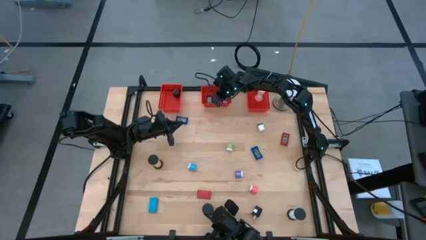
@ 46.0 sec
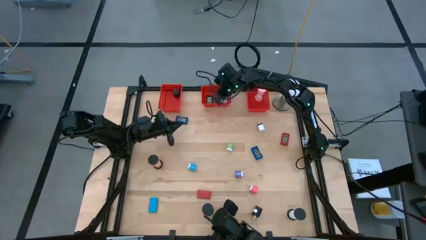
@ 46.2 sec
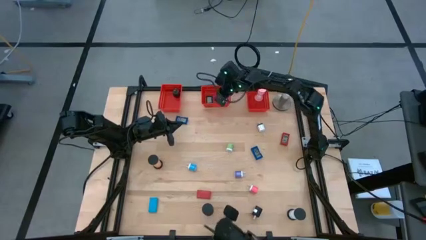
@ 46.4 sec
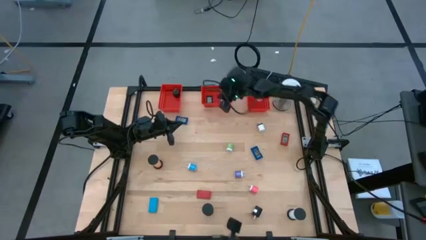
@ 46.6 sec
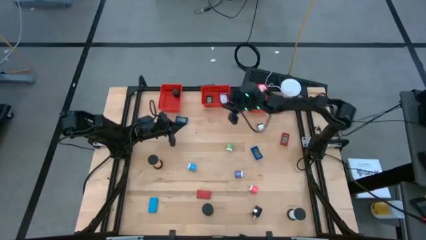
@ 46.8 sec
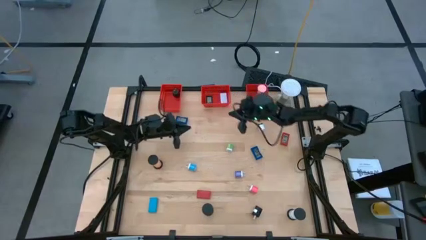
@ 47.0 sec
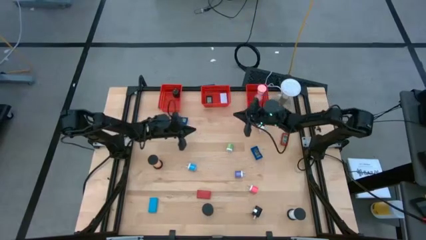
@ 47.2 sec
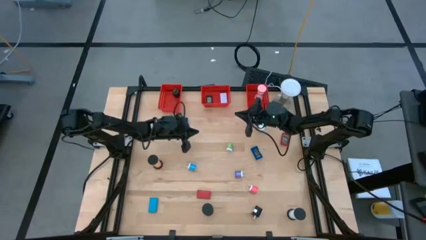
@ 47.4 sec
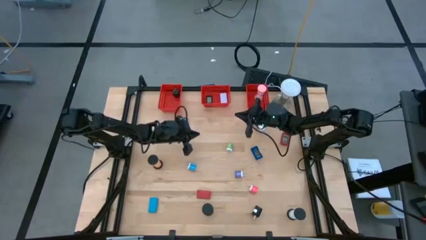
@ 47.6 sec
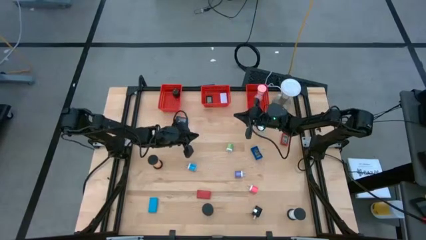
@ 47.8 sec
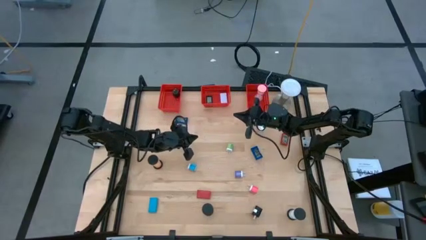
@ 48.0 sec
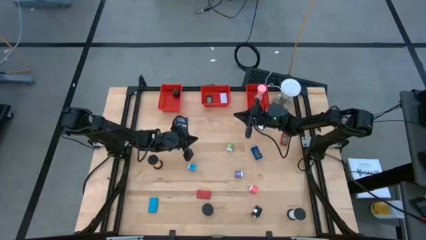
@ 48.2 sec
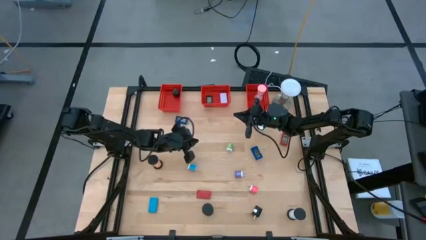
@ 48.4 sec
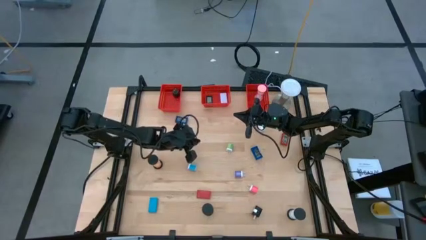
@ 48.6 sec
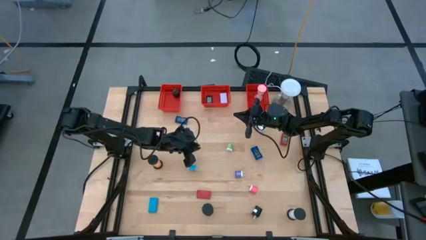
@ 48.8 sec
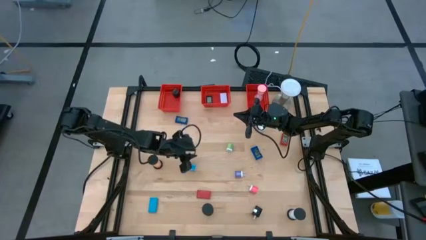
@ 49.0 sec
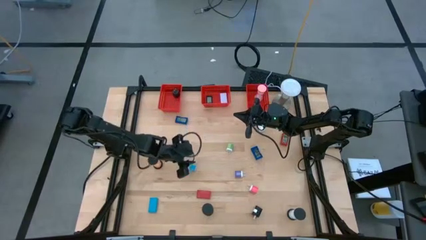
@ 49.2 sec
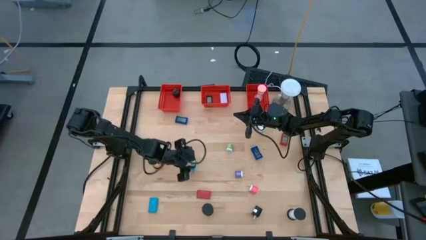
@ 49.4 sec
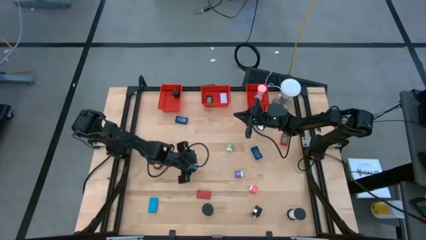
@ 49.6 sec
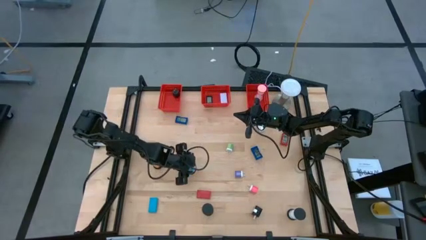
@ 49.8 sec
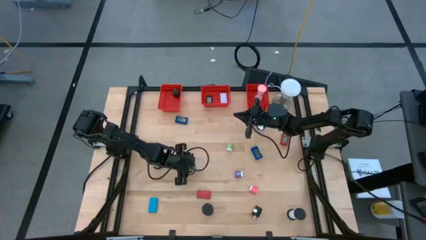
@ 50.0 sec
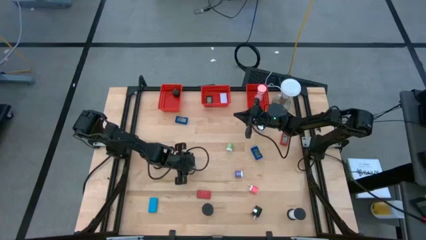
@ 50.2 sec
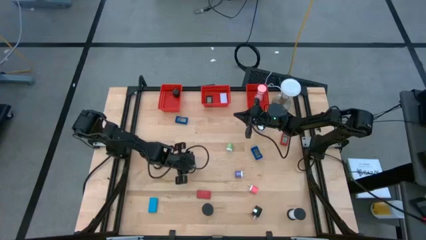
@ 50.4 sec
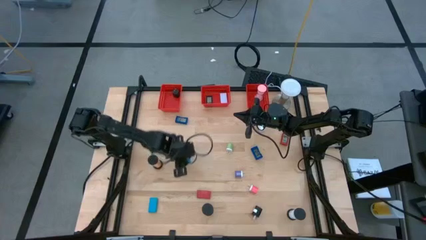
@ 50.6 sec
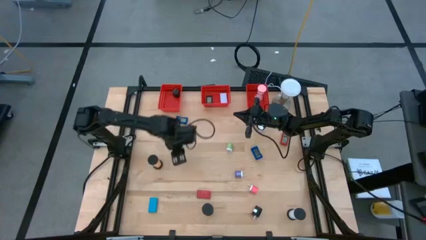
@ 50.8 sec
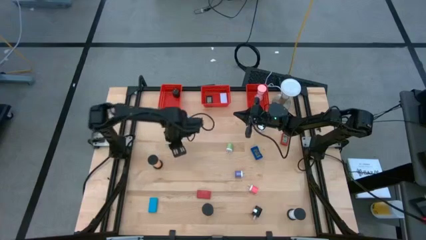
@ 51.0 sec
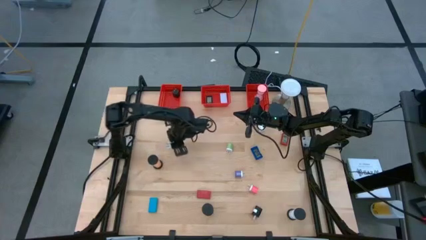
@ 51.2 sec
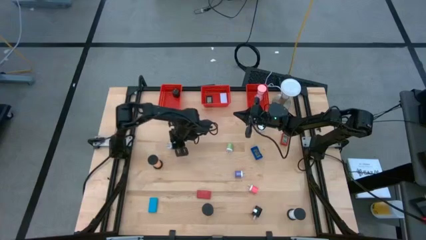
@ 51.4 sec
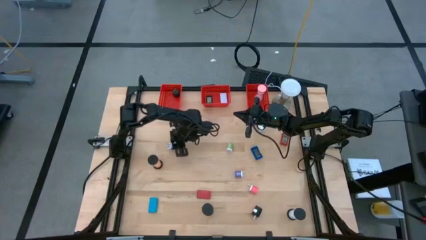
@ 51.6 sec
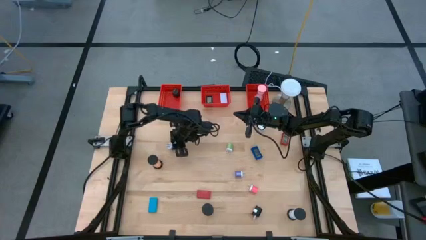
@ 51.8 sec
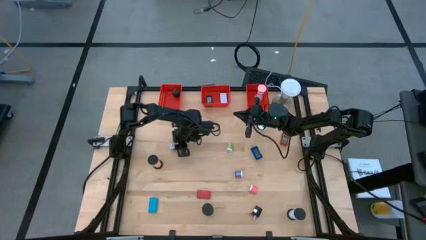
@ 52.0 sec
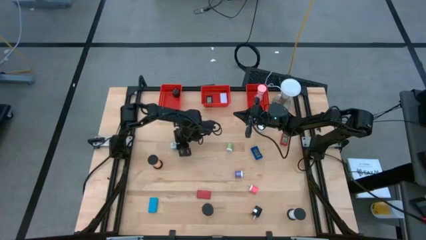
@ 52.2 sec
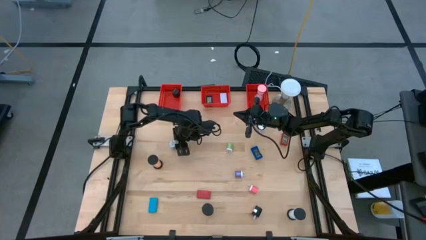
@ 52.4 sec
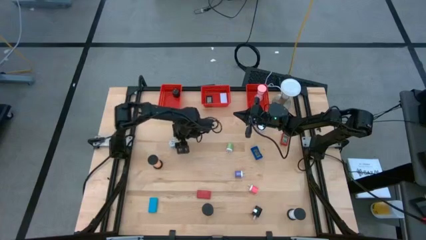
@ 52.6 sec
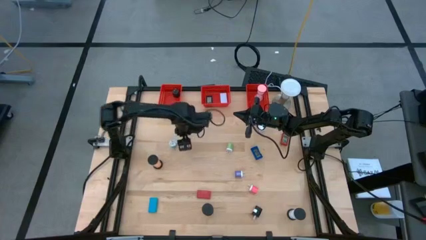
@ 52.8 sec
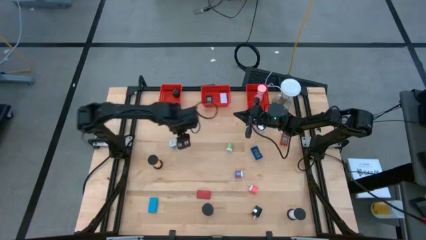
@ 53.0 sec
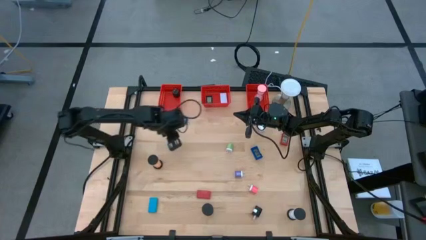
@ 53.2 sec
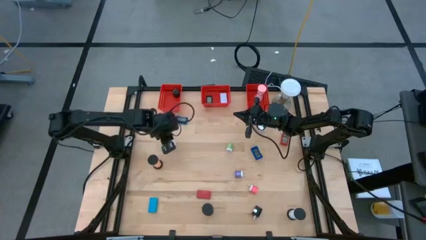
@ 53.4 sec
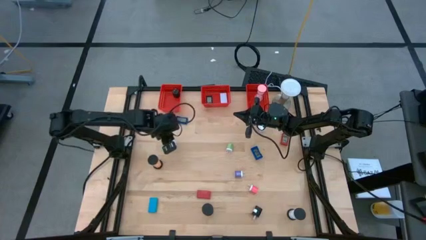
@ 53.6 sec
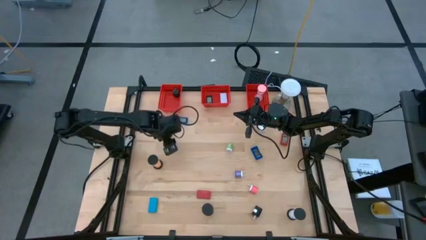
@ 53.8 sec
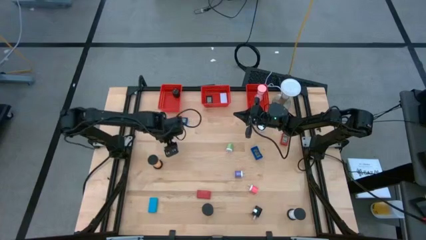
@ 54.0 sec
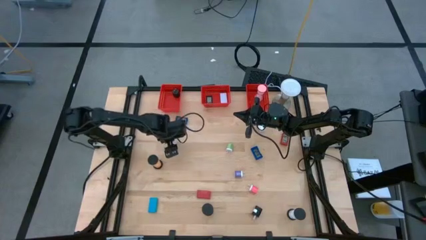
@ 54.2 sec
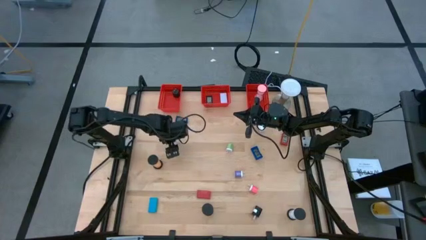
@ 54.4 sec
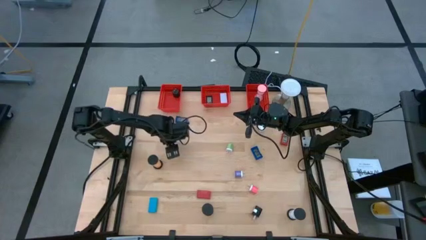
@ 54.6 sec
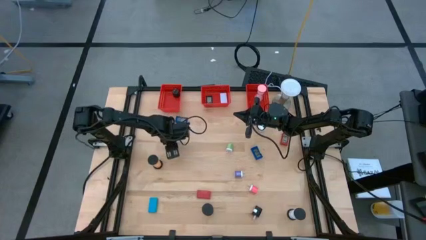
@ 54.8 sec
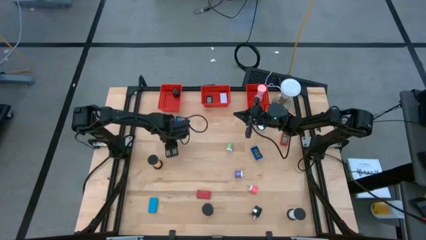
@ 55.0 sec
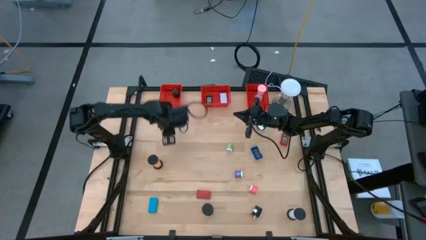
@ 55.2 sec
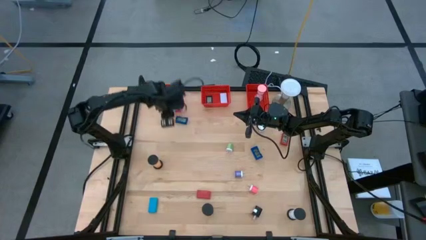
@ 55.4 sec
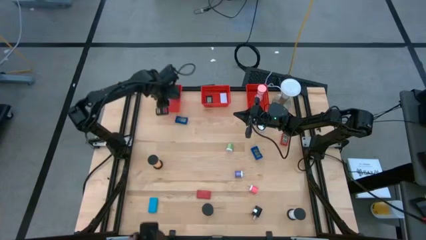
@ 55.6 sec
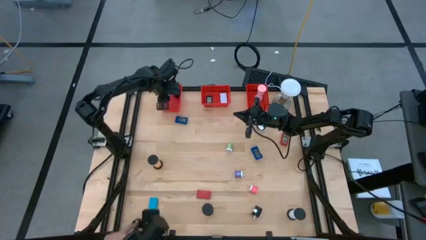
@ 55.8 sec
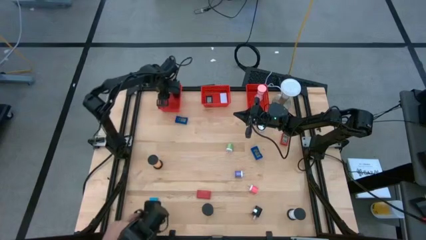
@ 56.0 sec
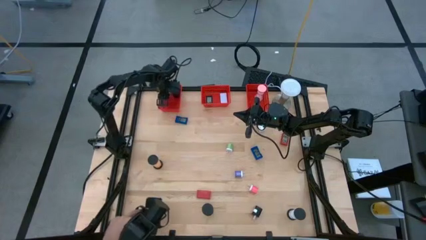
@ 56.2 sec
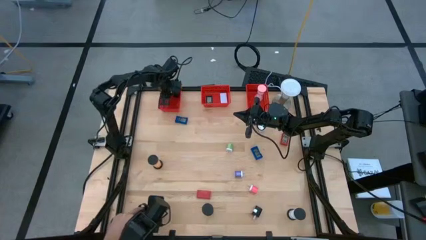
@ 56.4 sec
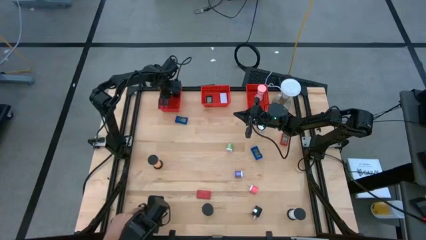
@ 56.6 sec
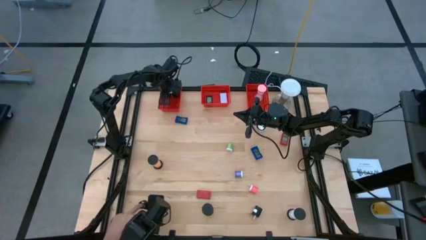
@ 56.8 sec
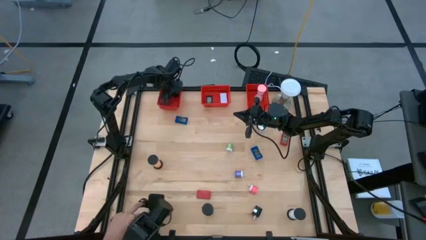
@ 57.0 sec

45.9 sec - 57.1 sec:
Task: Pick & Place Office items
Put the blue charger adapter into the left red bin

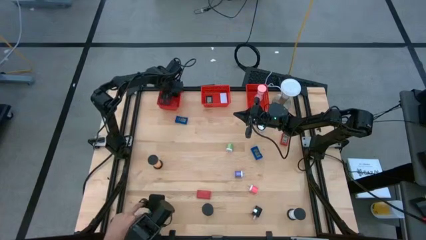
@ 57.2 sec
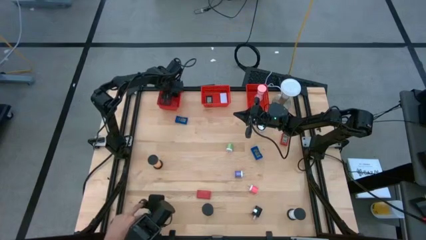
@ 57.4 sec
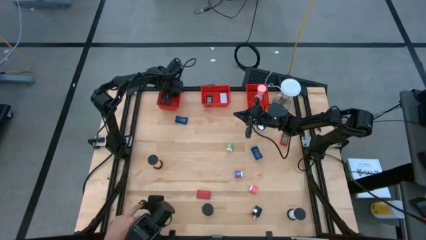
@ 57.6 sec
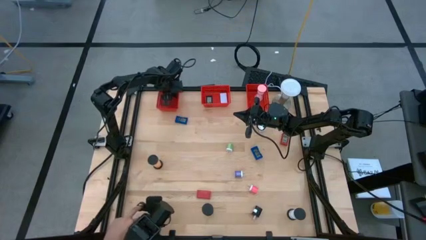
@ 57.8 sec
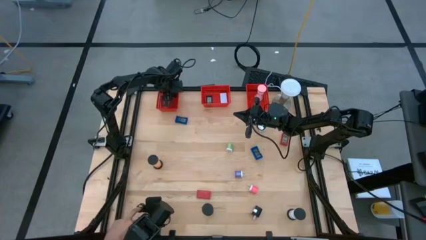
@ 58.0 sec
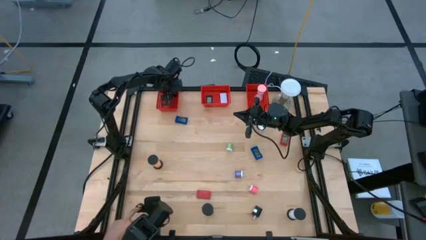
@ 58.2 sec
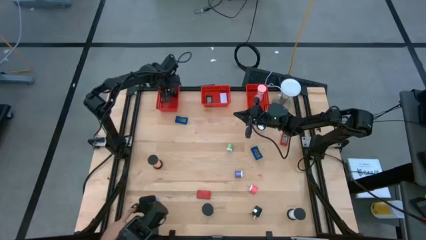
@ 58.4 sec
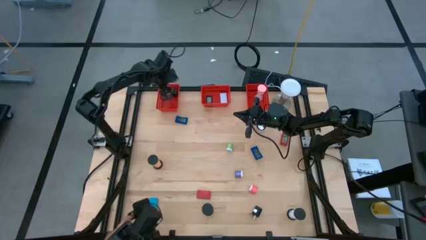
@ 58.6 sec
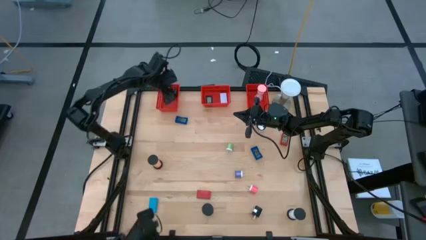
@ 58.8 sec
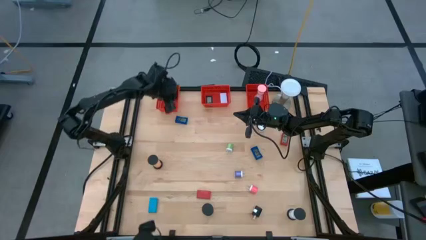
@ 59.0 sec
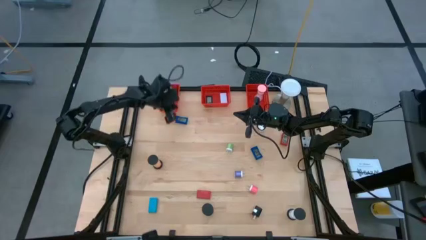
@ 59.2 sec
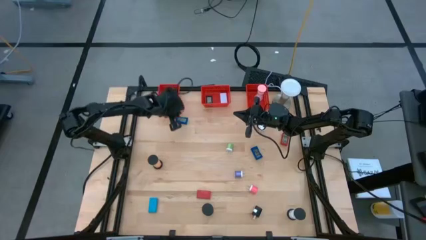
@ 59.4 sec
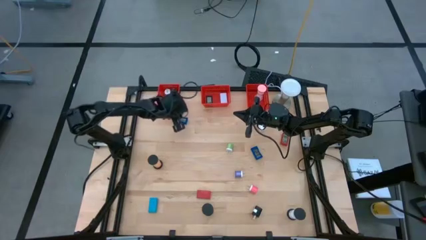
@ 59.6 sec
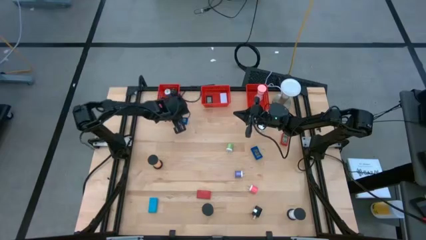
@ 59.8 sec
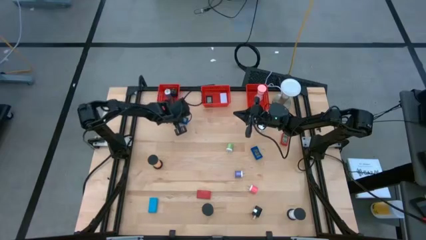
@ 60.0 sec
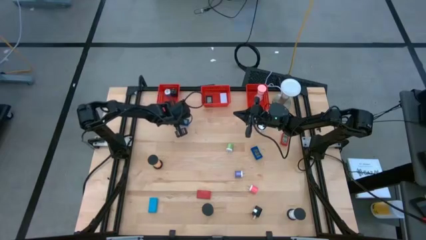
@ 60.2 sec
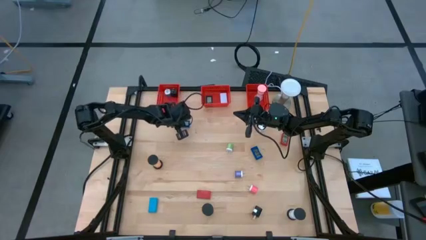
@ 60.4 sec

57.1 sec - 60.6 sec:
Adjust the blue digital clock
